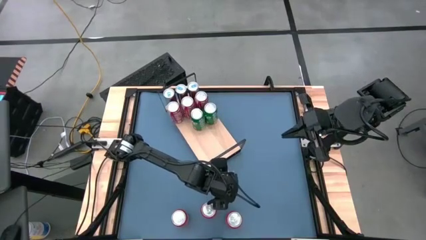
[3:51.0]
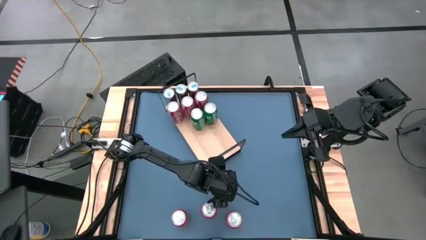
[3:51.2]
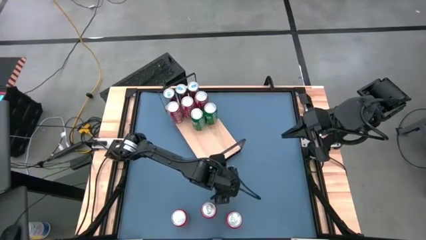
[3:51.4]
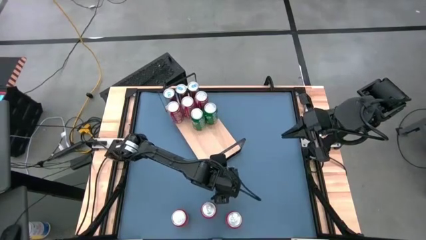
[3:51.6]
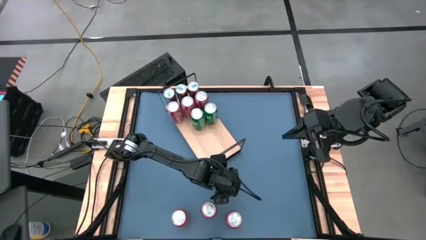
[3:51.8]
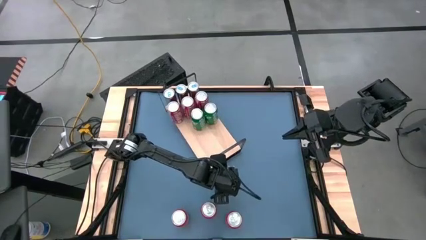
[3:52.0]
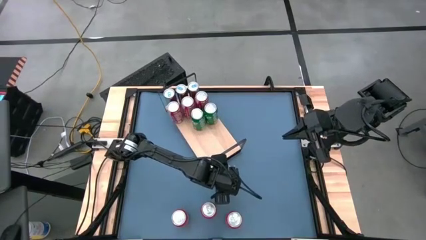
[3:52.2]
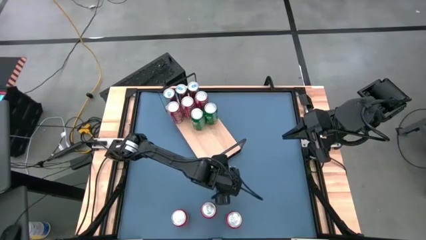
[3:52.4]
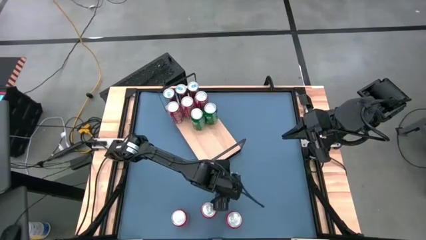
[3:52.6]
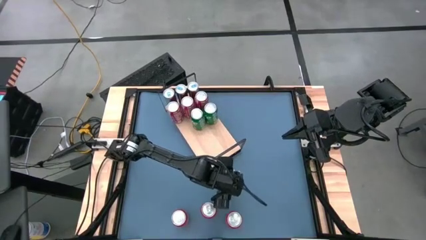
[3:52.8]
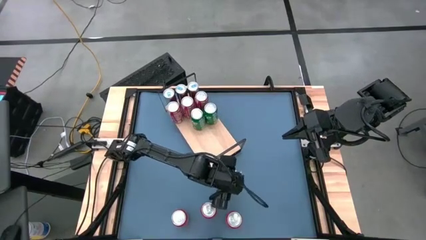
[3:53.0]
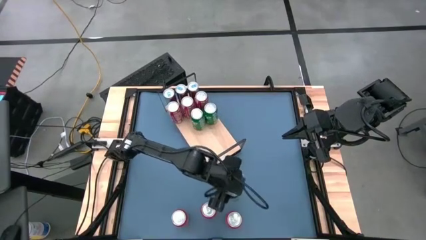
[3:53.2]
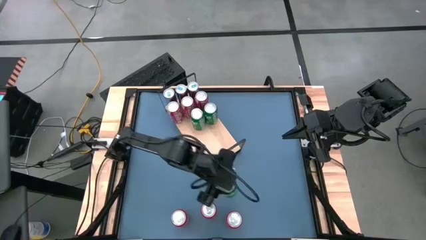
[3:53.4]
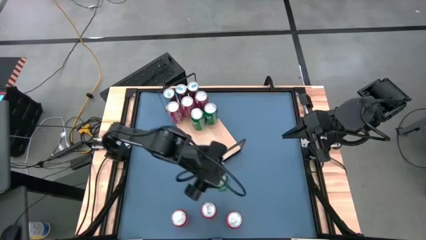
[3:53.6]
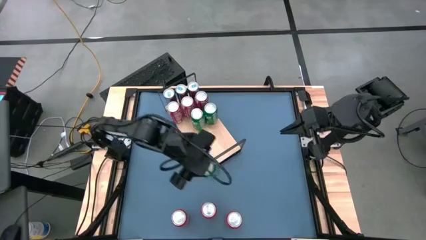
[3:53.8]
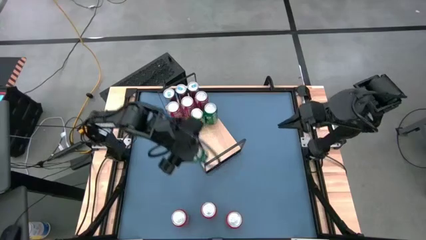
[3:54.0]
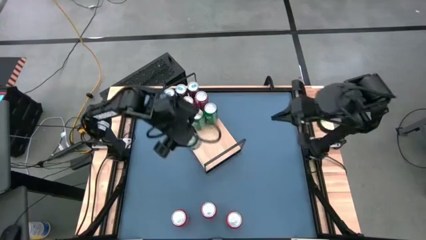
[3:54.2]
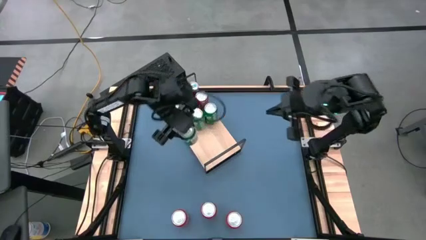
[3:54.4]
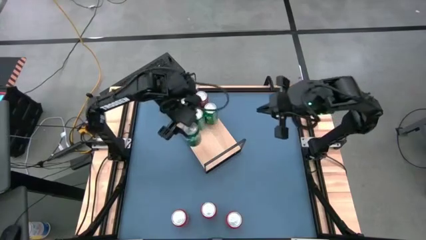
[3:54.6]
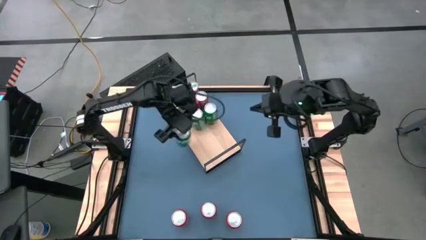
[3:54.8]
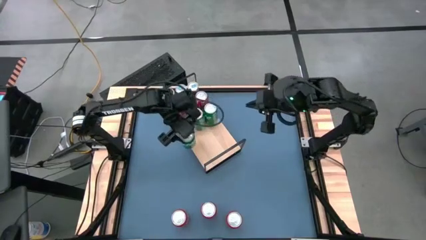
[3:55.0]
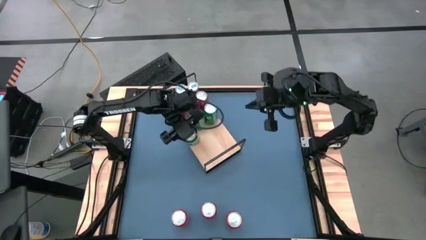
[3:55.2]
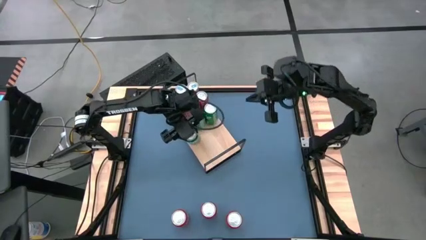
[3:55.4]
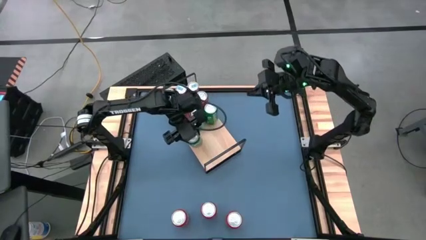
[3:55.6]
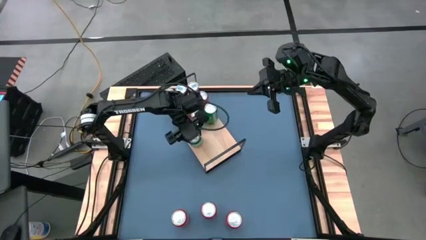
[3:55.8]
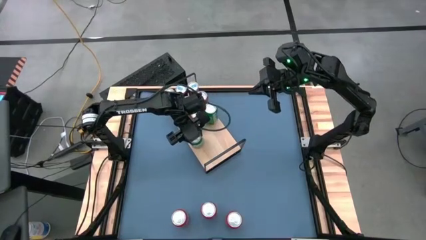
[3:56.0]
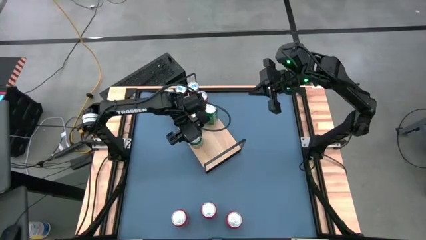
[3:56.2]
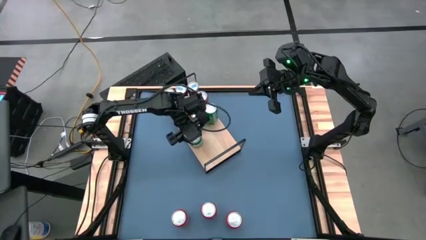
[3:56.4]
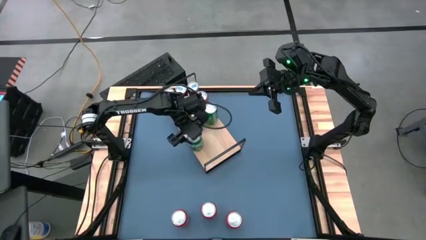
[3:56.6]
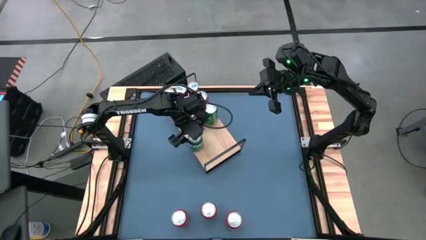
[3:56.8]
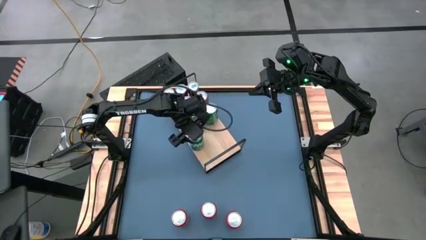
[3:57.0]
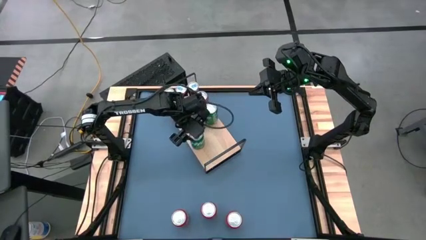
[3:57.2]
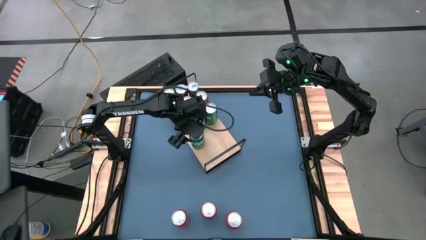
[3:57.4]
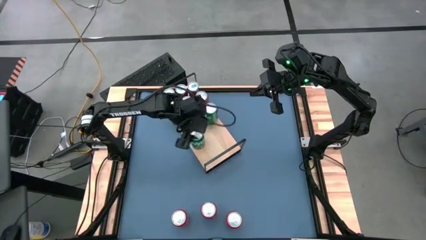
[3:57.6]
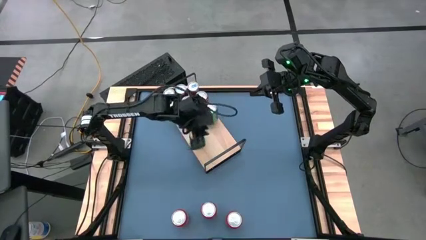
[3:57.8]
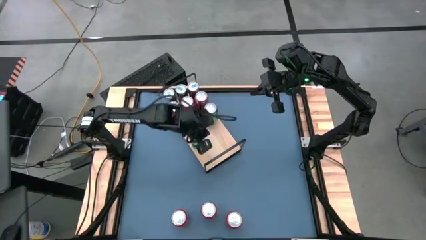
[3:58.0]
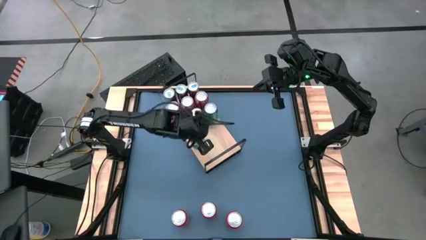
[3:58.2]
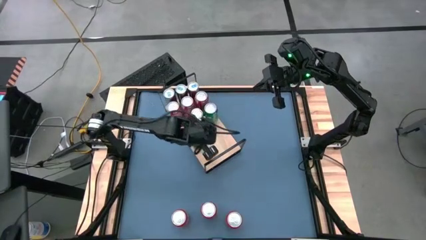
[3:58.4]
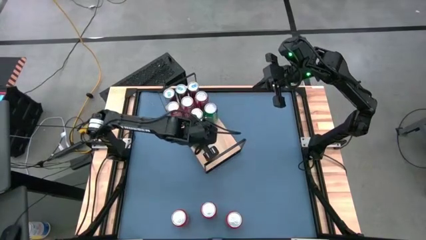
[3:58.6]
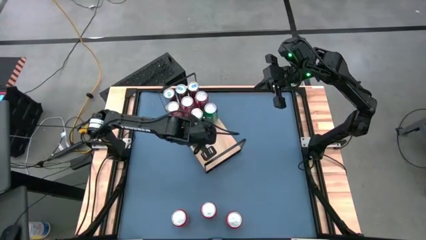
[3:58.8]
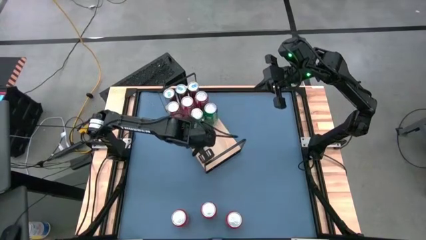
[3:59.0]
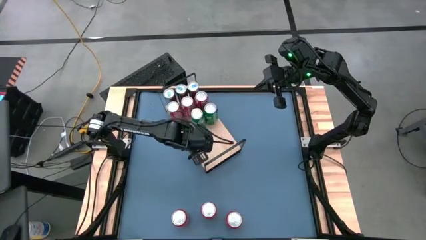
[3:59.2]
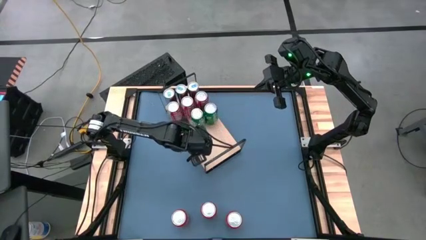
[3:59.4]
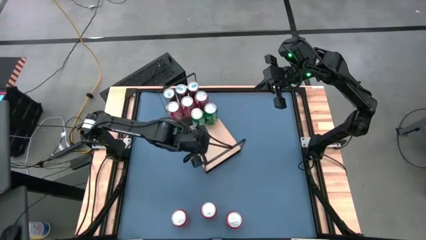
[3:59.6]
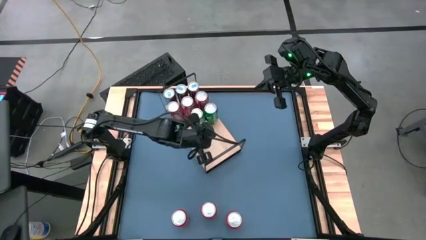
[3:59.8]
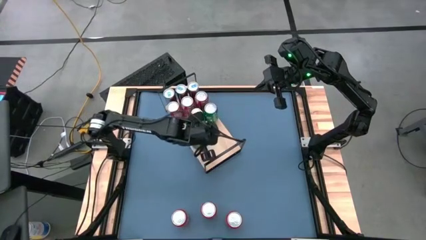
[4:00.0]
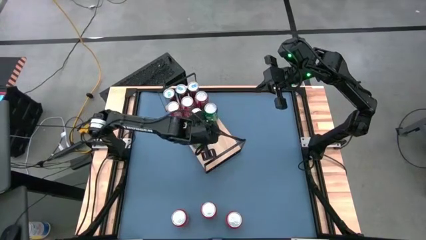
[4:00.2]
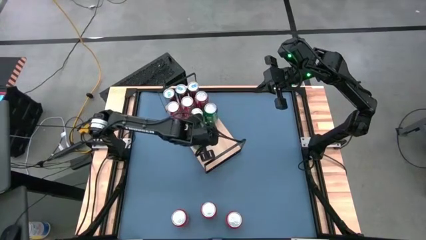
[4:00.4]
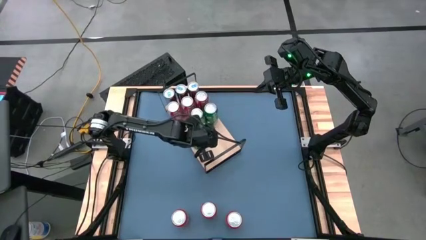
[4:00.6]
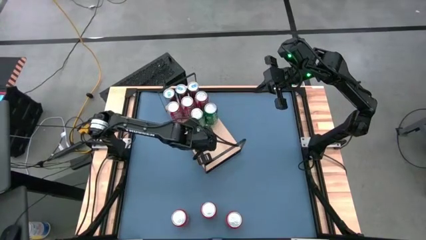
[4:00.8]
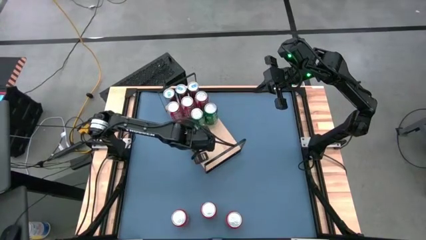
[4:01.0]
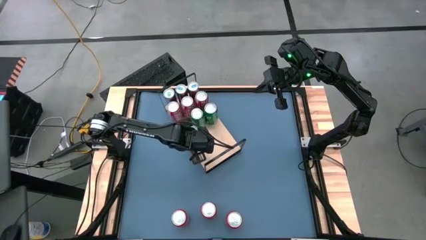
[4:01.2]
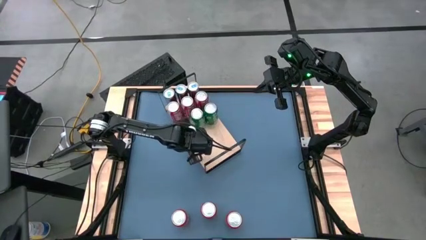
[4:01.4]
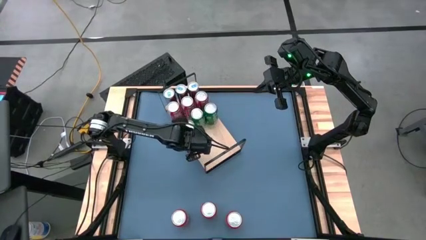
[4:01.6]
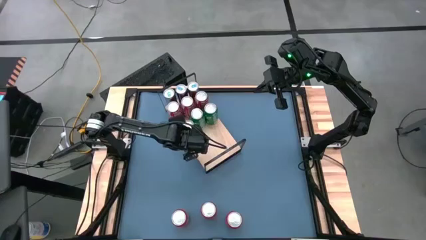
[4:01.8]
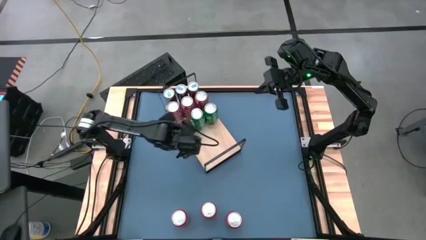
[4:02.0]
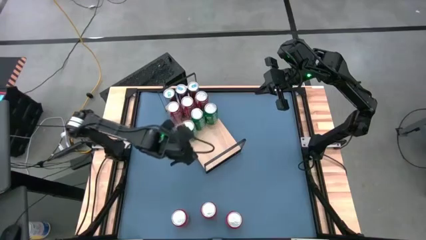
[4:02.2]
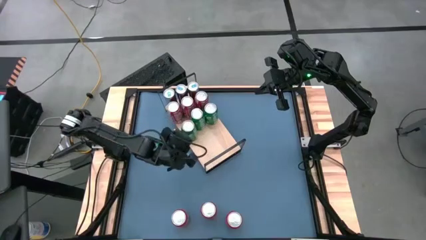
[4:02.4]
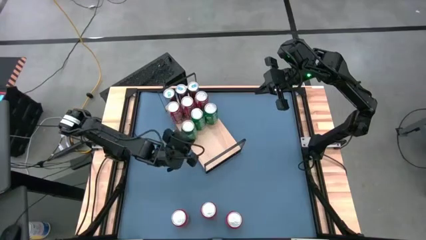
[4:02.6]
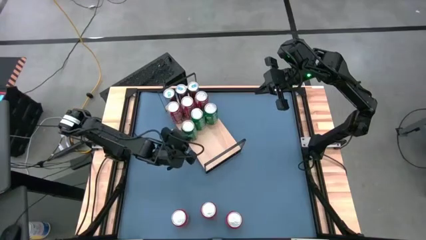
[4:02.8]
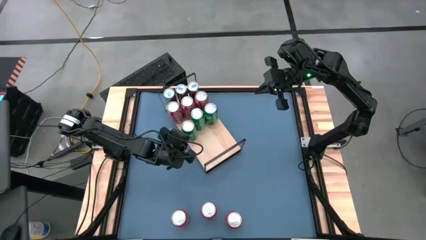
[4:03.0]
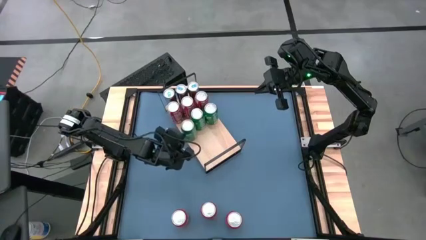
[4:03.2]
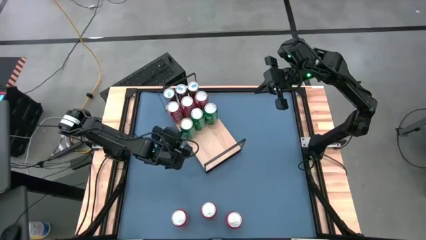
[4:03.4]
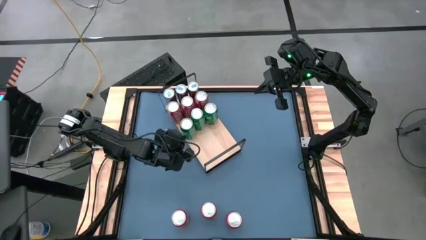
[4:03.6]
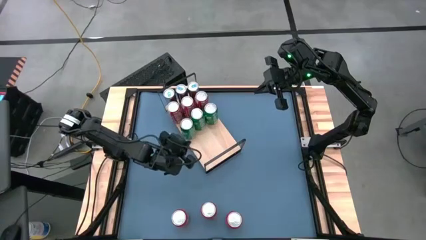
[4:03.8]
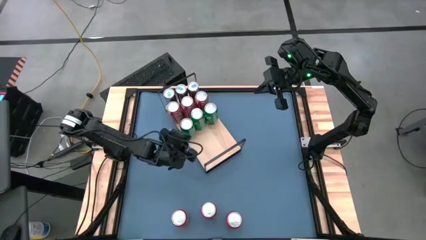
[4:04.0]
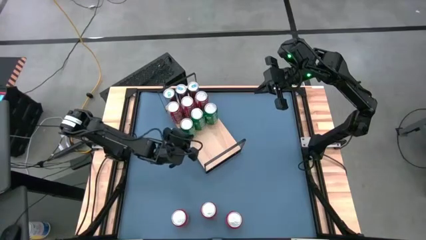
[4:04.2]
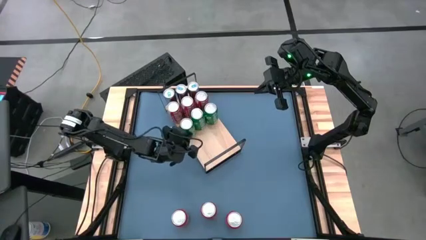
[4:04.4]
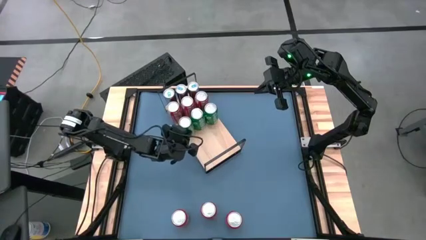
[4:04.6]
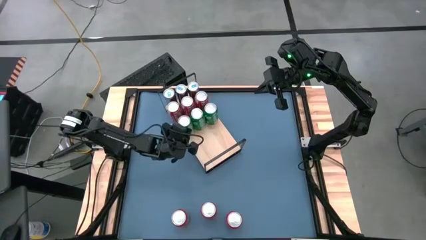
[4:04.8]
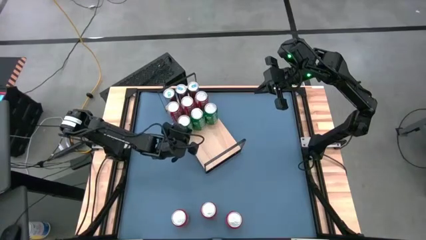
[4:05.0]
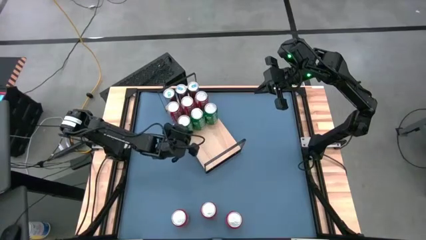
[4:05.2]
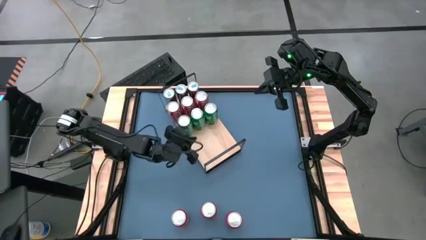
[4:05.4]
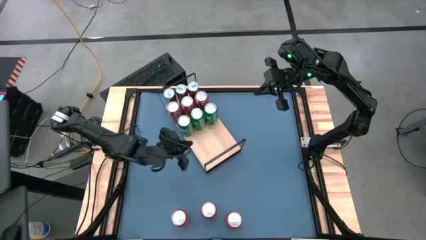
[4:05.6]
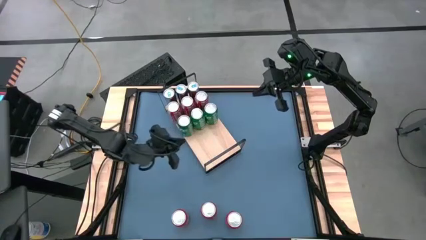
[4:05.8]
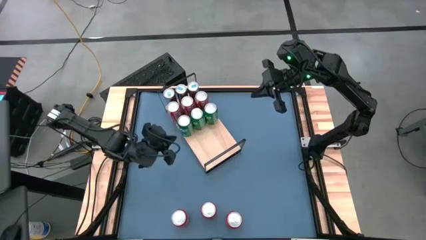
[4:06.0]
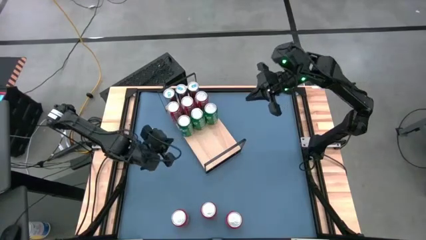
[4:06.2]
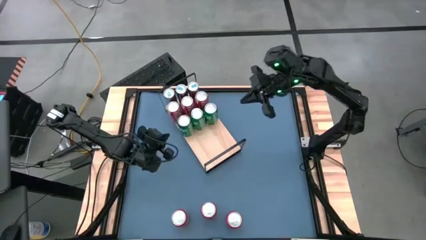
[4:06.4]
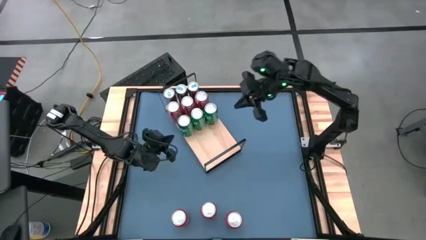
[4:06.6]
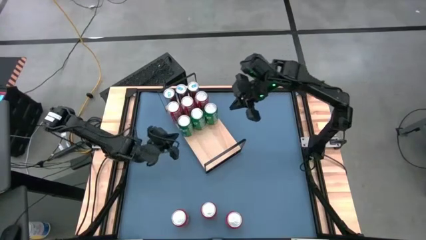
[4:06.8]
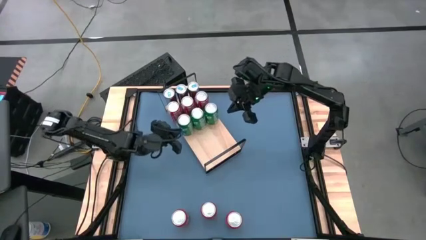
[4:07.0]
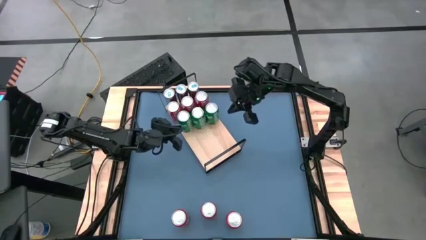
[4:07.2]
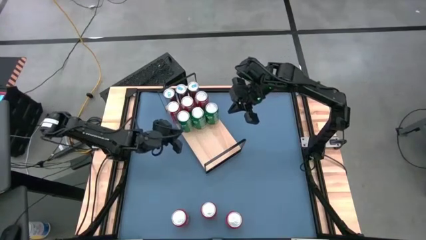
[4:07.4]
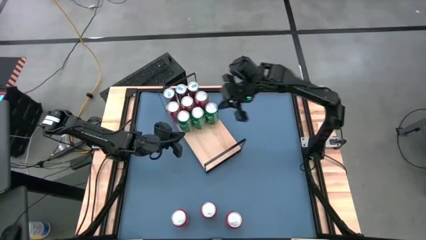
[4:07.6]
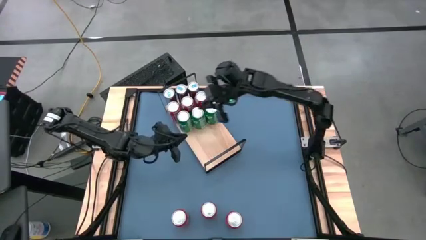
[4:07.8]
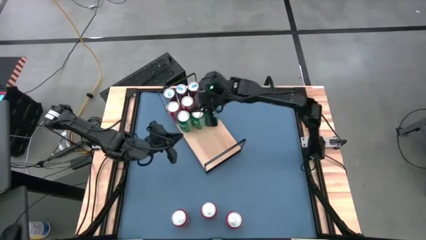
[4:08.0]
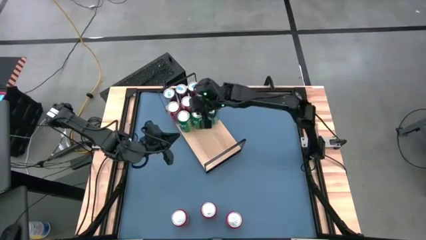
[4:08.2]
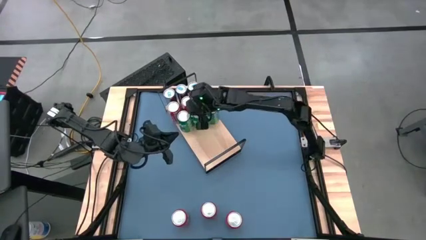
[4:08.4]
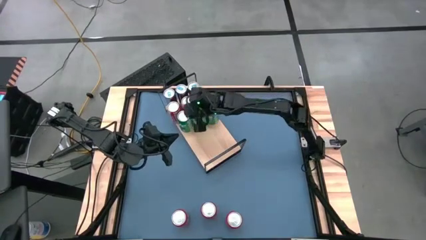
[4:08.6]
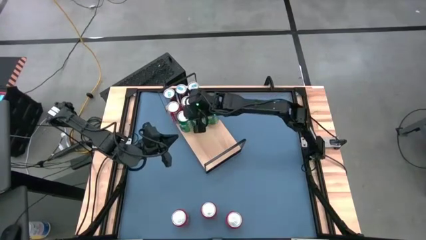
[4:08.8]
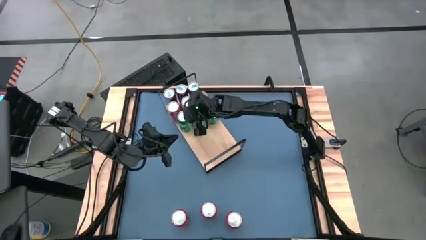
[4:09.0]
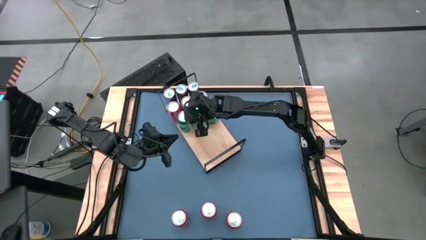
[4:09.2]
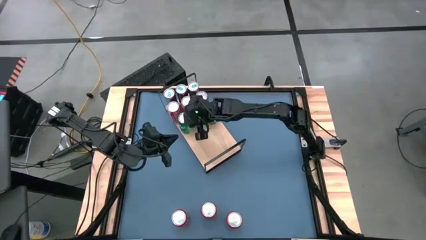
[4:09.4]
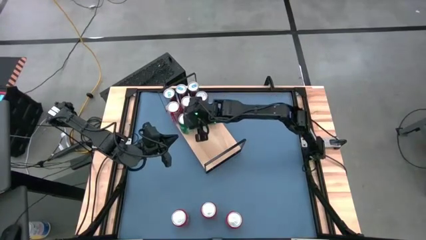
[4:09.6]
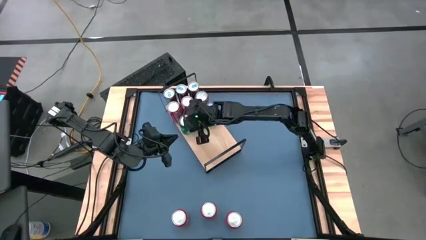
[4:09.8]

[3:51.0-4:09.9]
Task: Place canned beverage on shelf
Put the green soda can on the shelf aligned with the other green soda cans
